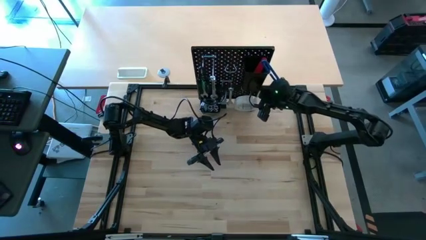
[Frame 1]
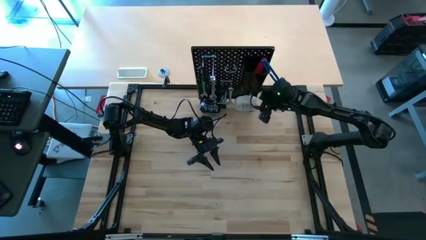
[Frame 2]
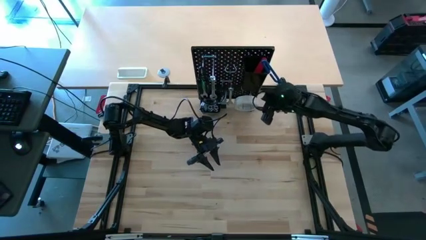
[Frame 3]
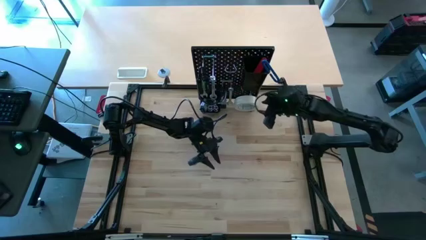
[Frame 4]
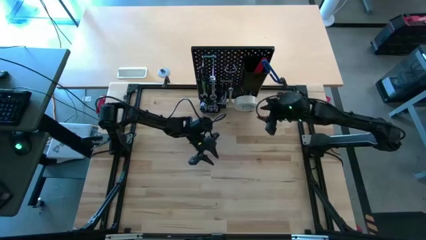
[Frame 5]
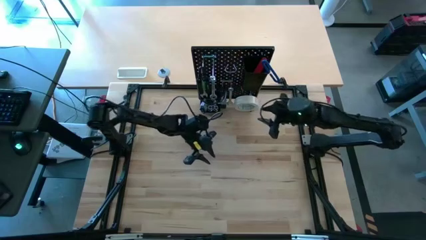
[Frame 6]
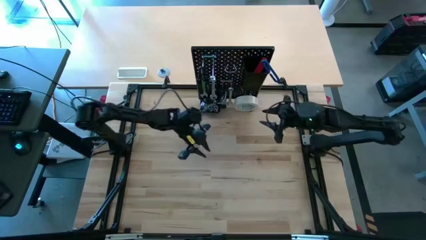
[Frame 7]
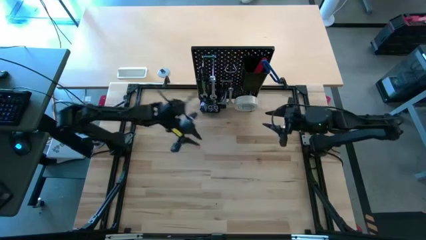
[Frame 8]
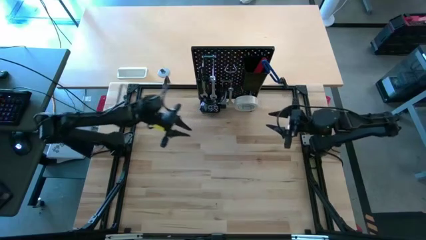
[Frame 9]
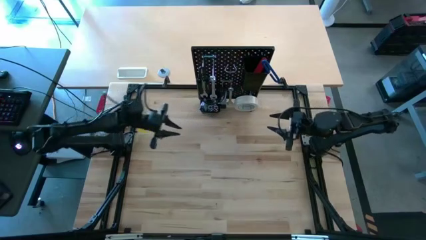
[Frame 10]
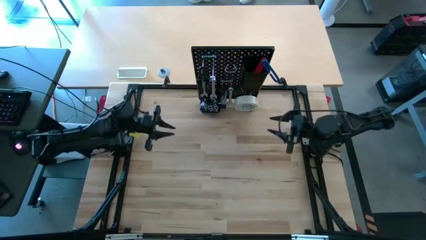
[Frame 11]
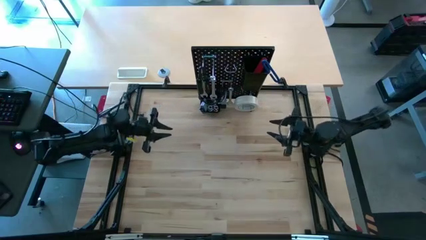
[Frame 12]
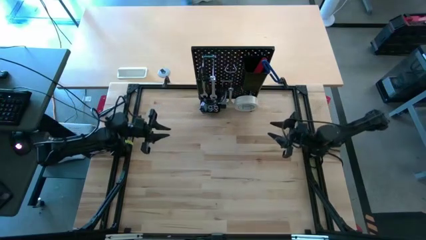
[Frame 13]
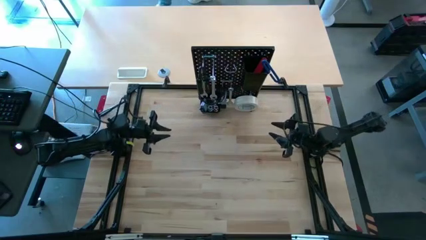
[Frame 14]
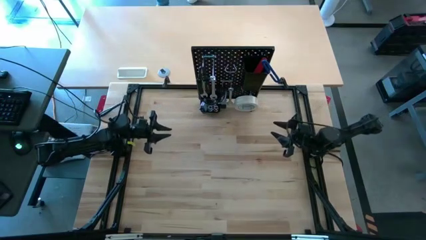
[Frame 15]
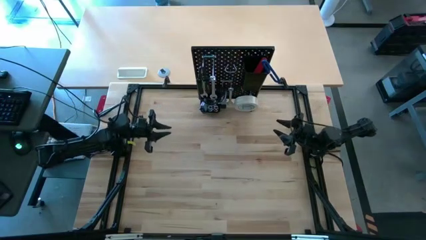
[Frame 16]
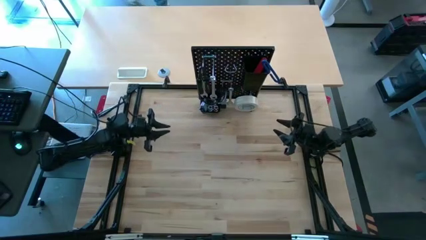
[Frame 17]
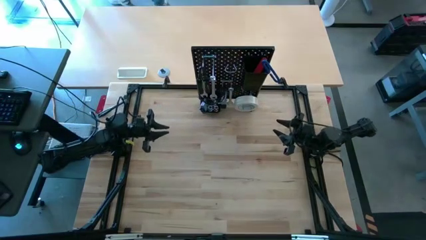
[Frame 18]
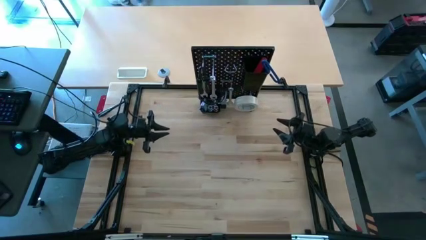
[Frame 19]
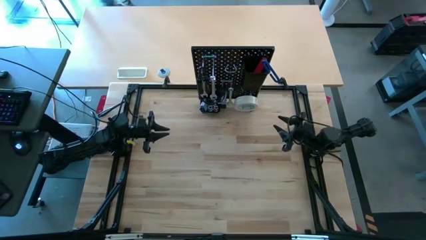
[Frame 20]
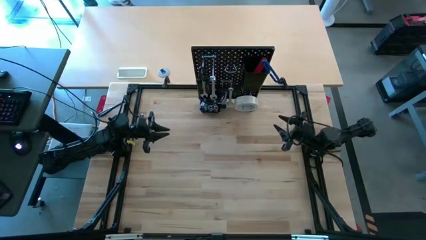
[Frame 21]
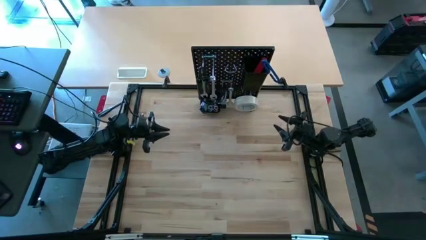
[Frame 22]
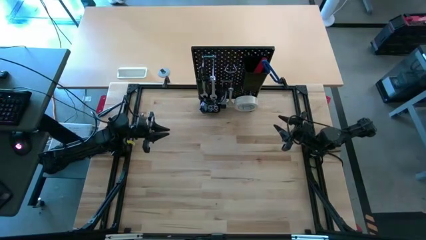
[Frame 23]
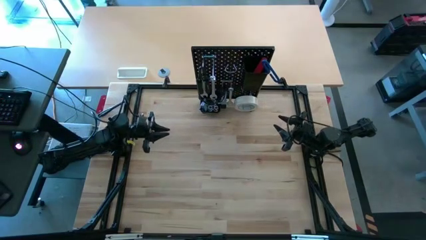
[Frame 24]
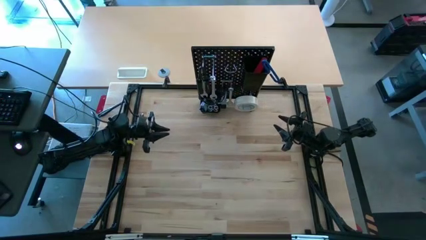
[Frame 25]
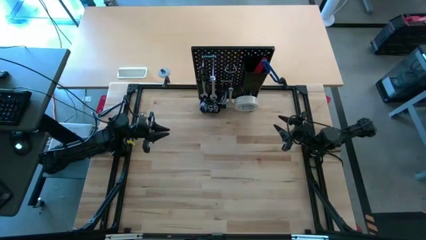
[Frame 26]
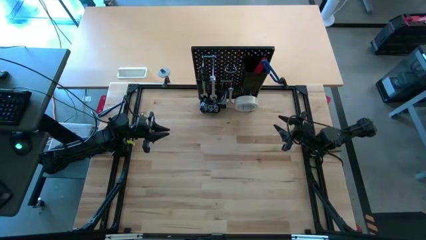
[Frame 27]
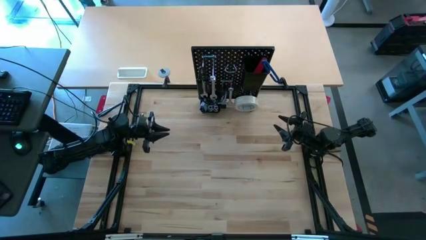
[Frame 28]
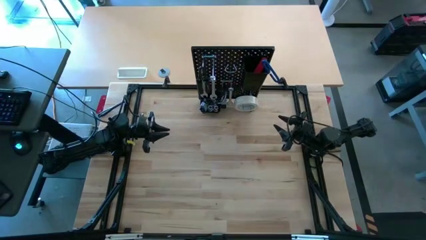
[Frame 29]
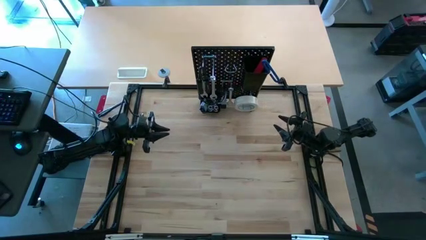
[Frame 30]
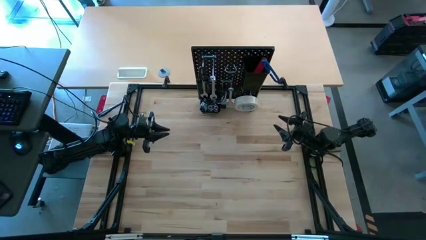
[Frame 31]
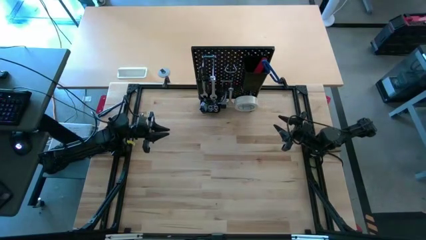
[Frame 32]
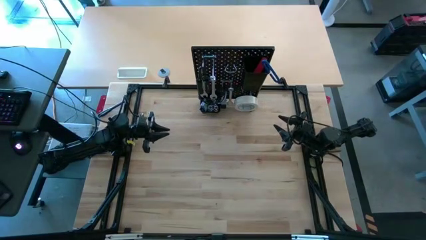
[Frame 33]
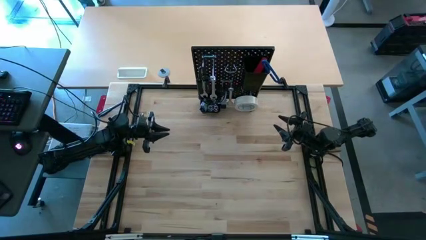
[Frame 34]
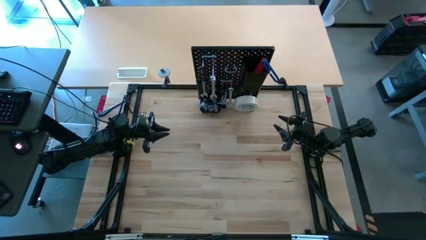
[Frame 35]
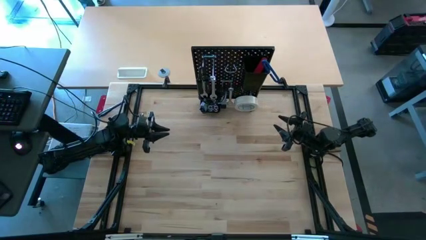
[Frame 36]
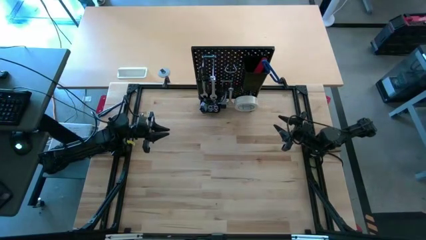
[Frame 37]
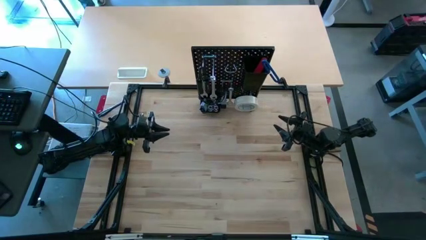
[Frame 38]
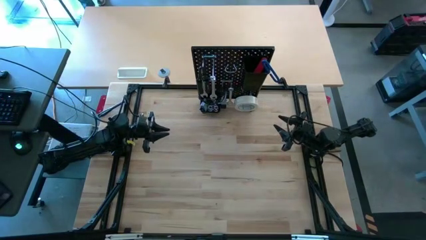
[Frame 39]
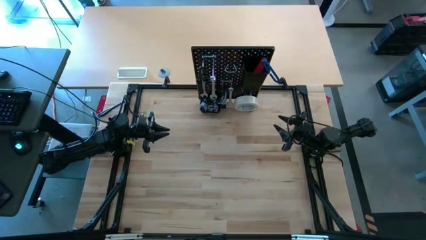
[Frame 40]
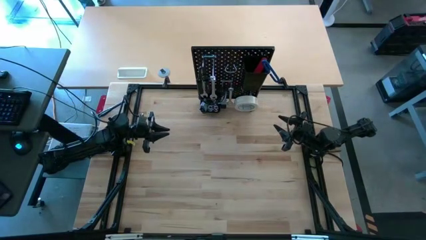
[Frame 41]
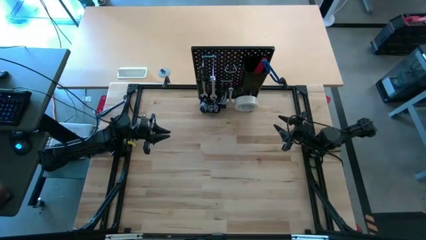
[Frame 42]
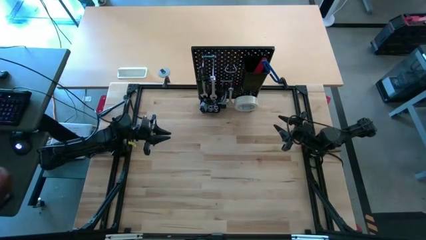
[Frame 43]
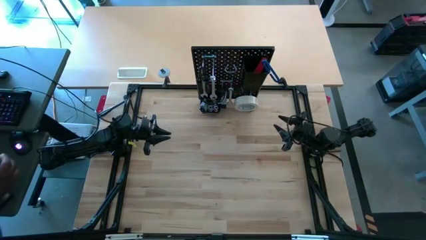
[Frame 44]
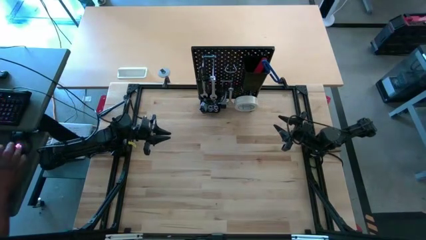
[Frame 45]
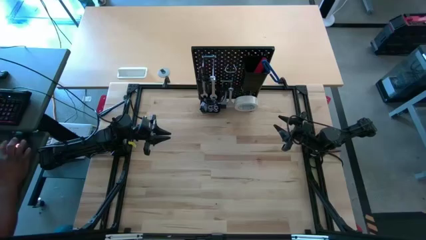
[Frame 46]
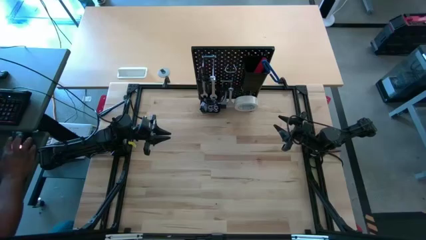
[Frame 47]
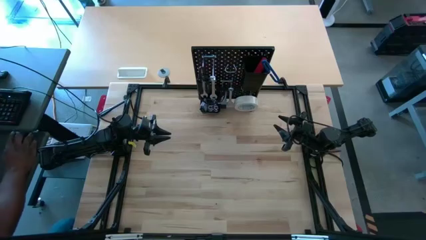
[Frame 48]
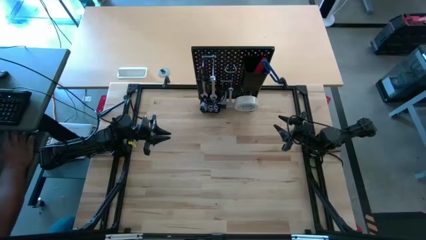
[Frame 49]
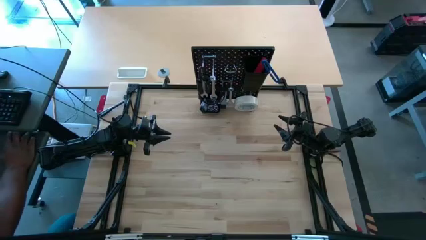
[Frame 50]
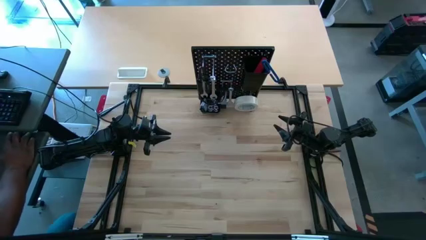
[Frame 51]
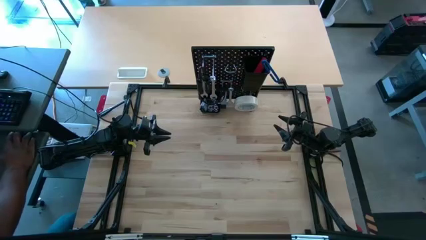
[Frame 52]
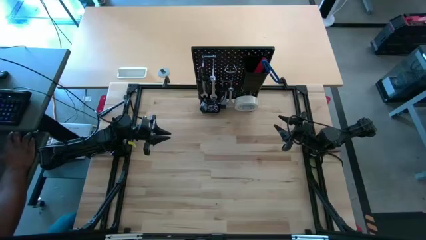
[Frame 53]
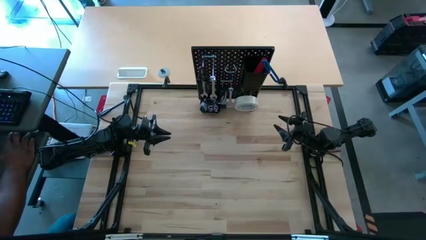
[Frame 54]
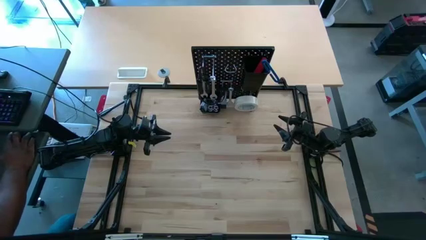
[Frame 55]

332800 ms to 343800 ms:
Task: Hang tools onto peg board
Return to Home Position

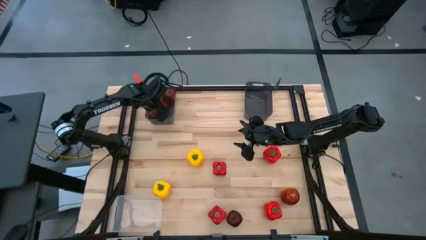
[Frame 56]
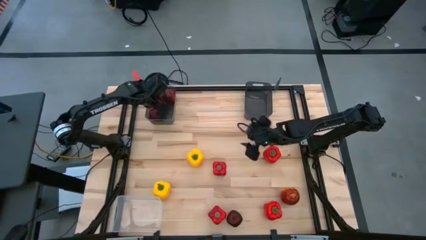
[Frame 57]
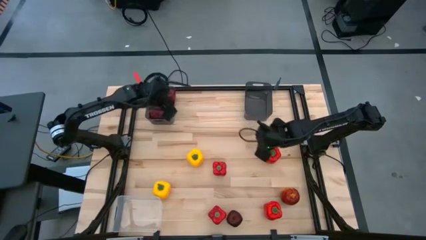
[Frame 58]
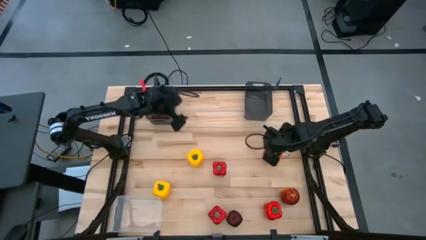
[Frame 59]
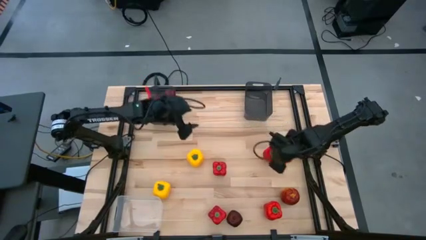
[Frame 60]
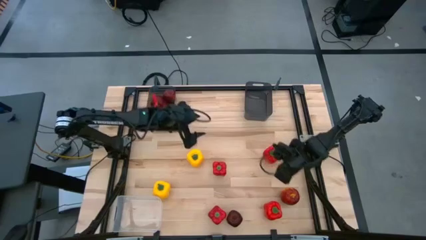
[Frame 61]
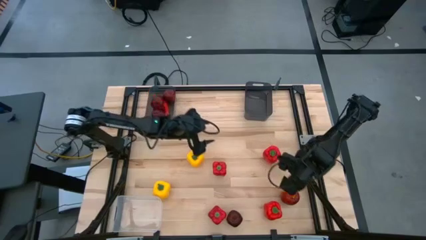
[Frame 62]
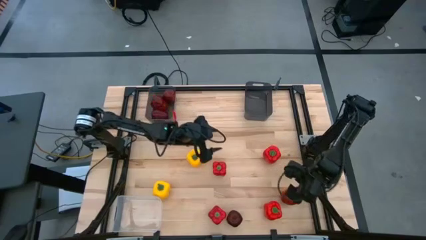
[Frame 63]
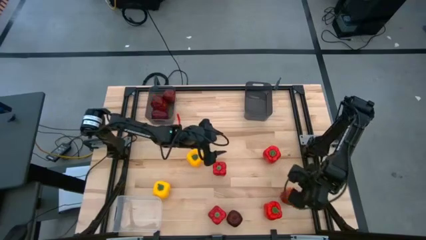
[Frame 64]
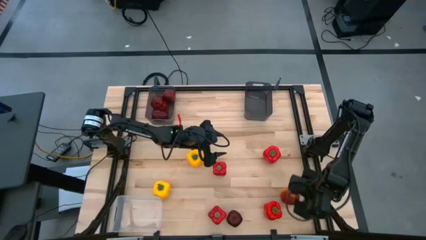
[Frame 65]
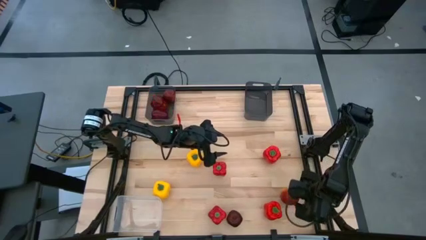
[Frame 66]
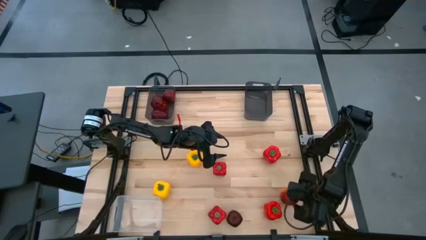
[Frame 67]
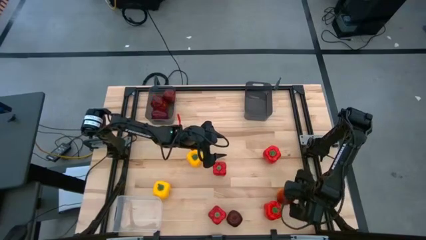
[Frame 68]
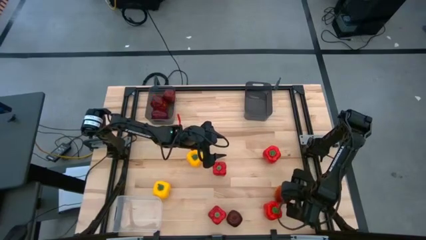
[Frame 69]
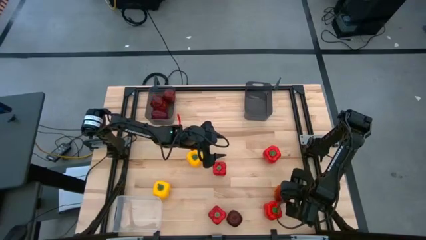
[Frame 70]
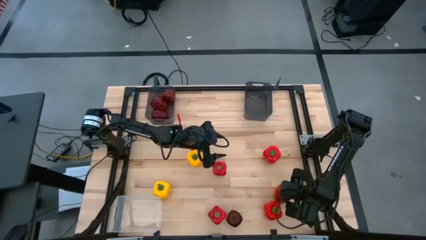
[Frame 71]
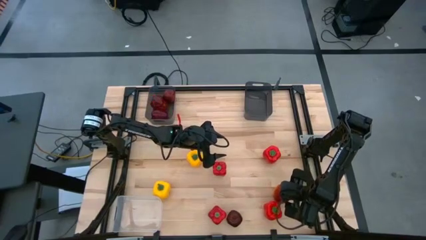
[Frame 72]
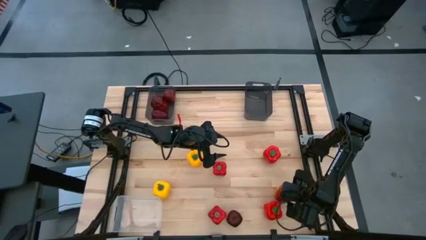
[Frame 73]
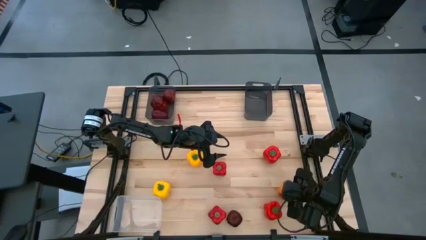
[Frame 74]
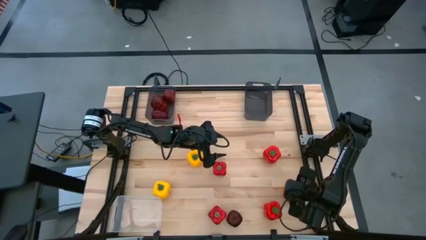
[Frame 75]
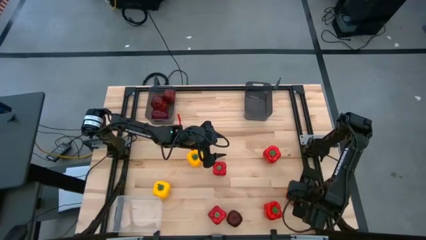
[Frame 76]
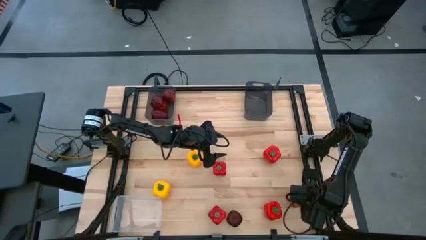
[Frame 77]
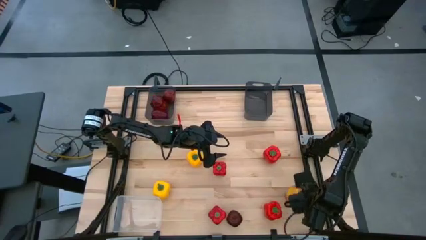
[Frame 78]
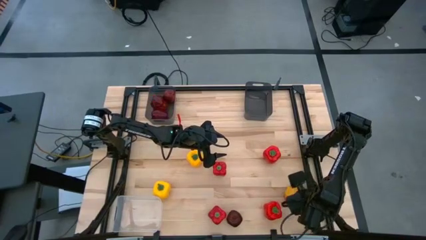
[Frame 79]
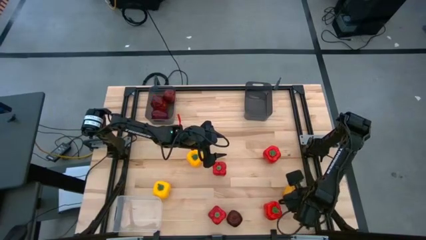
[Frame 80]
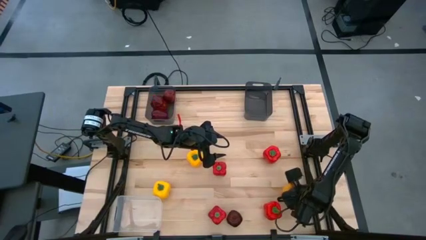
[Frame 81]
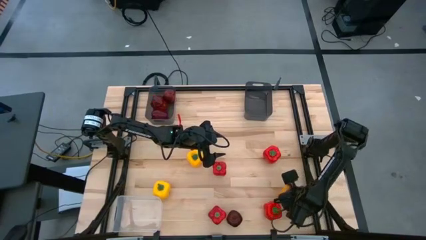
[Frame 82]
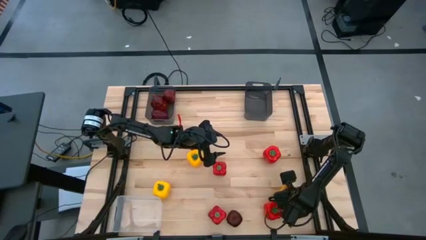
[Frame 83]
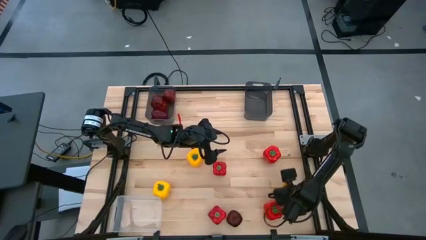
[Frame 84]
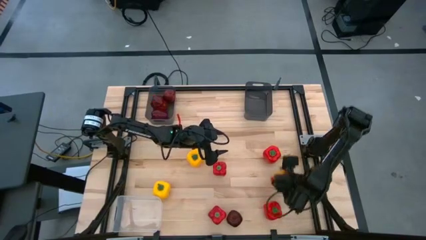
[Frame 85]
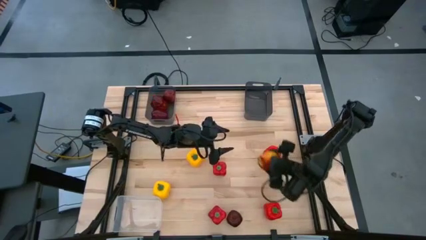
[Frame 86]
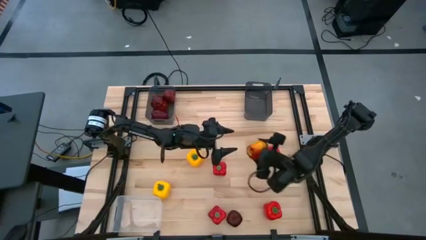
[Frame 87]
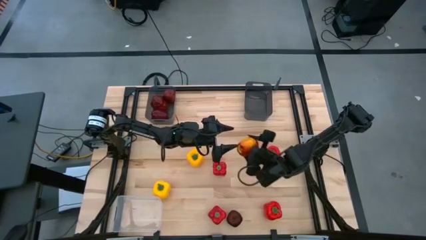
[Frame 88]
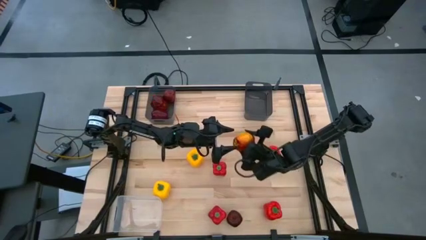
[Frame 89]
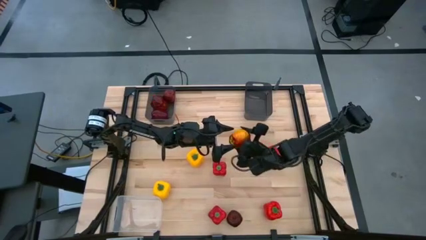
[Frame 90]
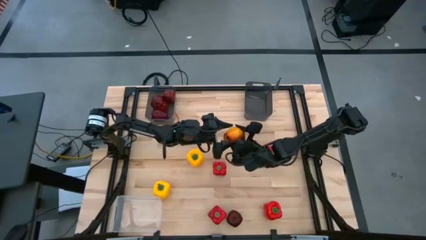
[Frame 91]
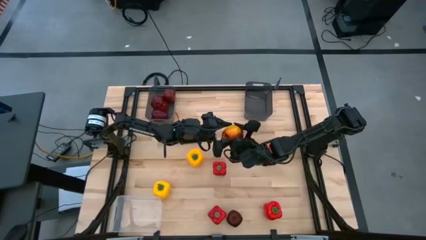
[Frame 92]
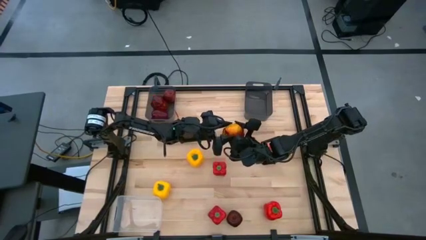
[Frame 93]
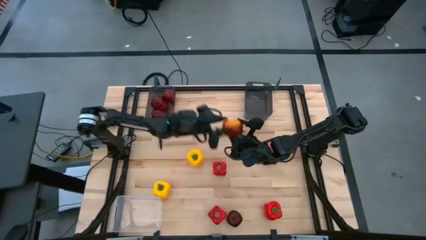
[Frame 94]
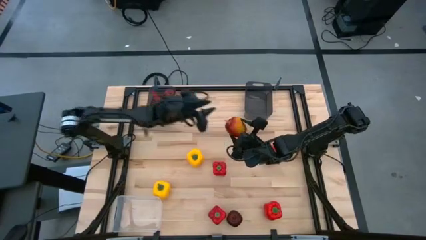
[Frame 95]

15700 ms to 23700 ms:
Task: Sort produce into baskets
Put the red apple into the left black bin
